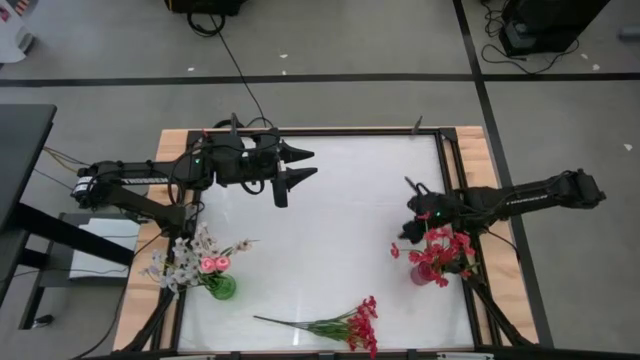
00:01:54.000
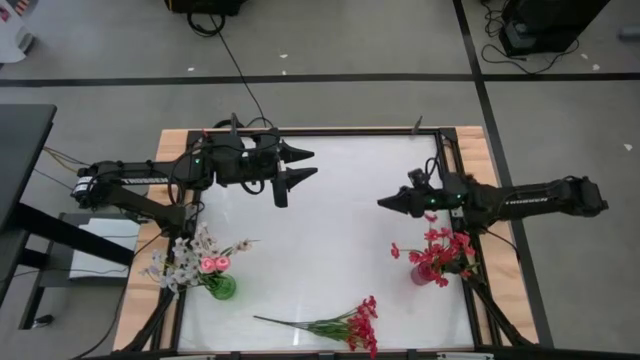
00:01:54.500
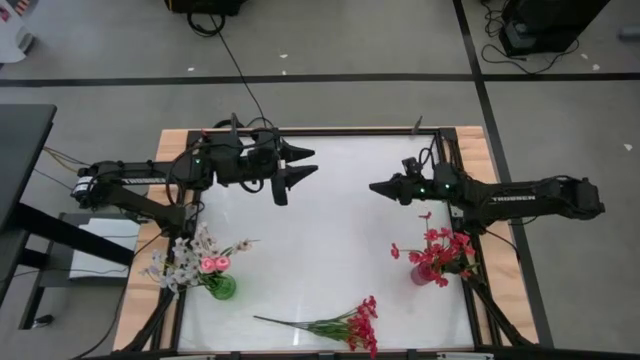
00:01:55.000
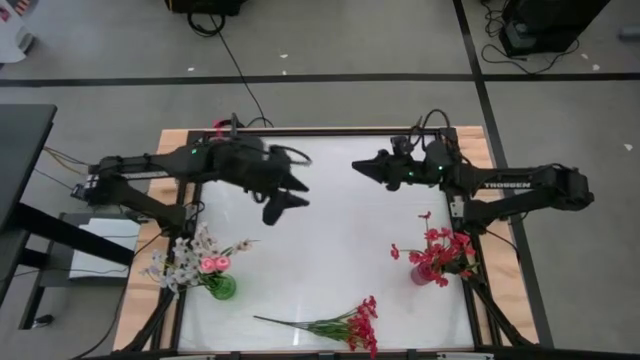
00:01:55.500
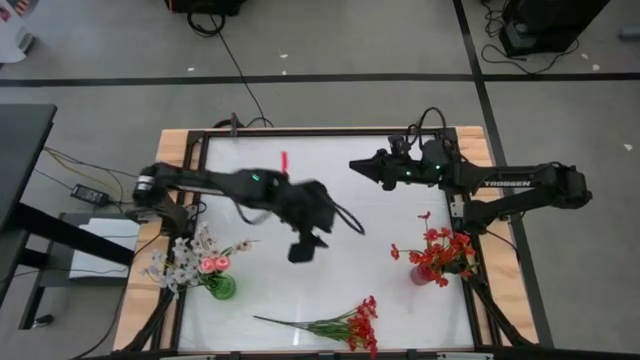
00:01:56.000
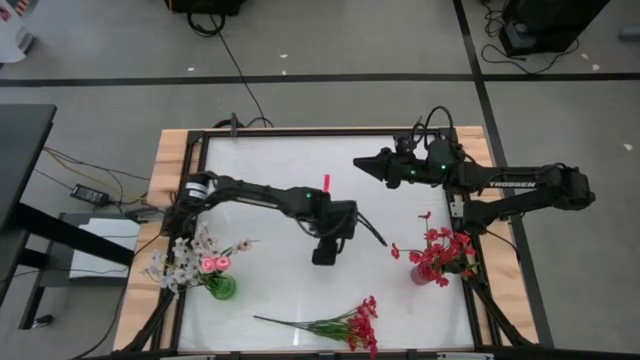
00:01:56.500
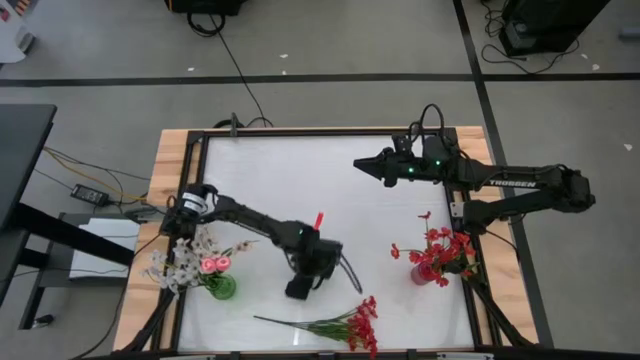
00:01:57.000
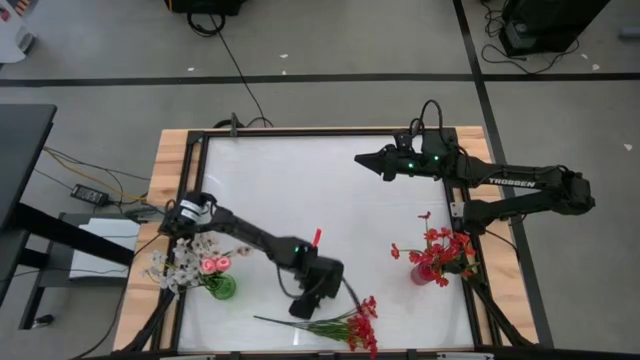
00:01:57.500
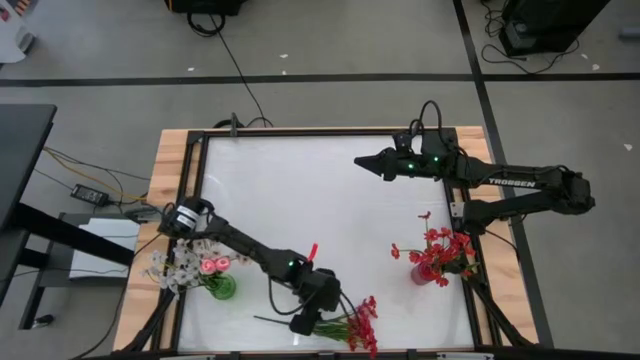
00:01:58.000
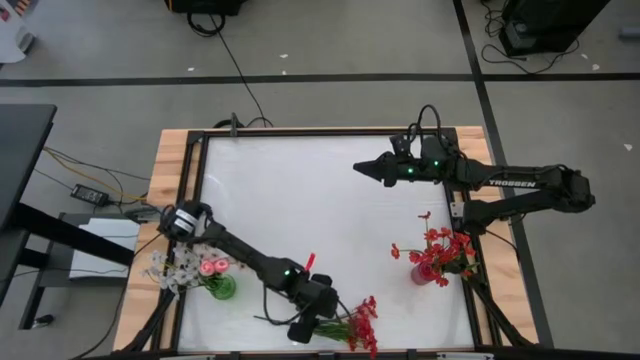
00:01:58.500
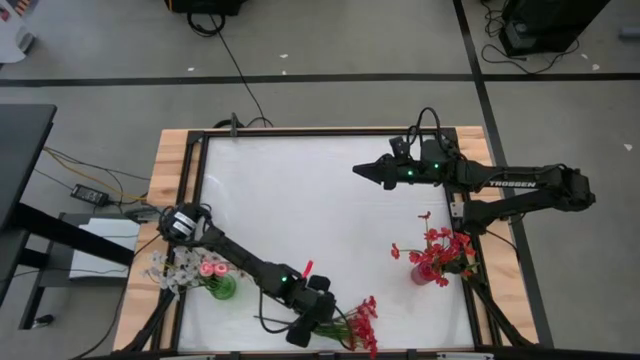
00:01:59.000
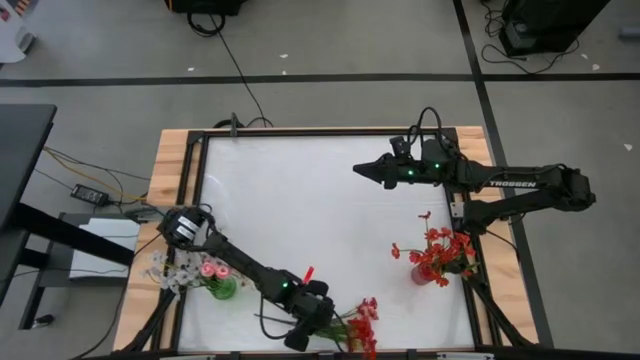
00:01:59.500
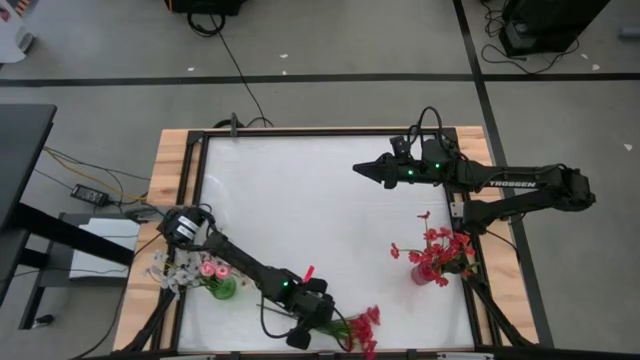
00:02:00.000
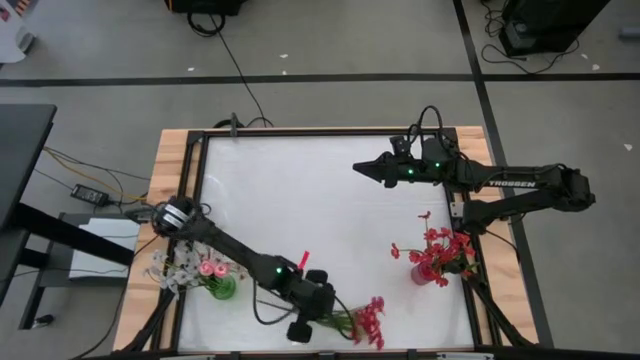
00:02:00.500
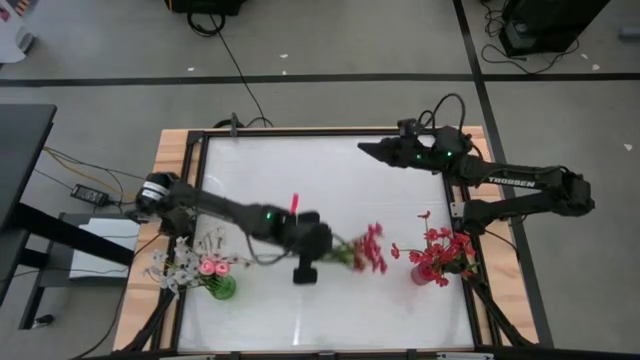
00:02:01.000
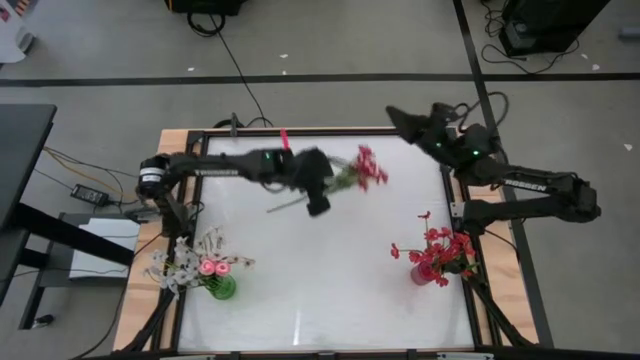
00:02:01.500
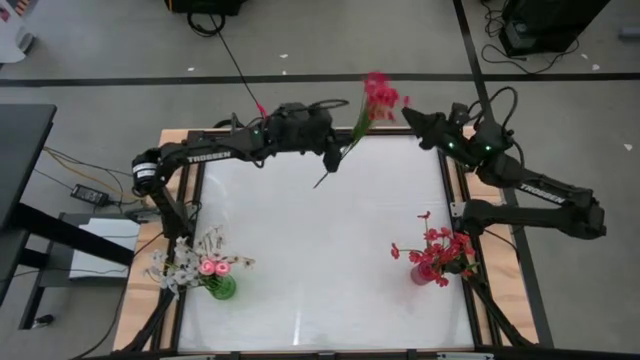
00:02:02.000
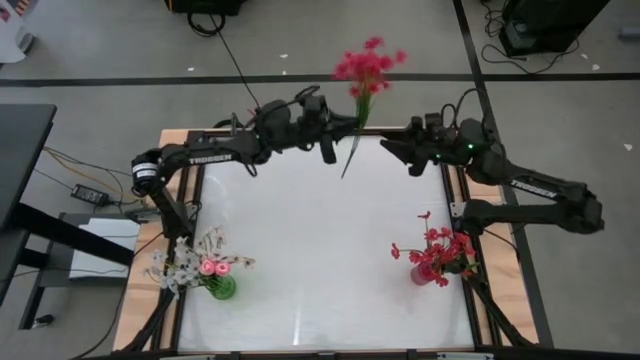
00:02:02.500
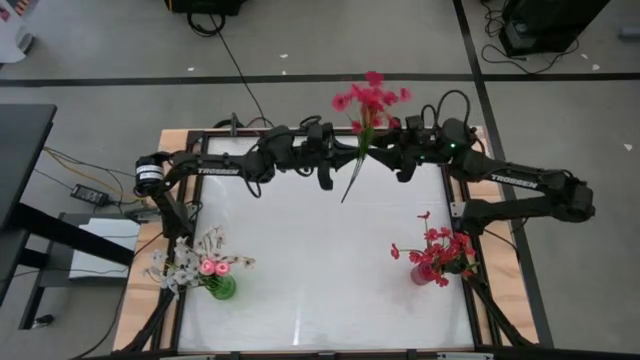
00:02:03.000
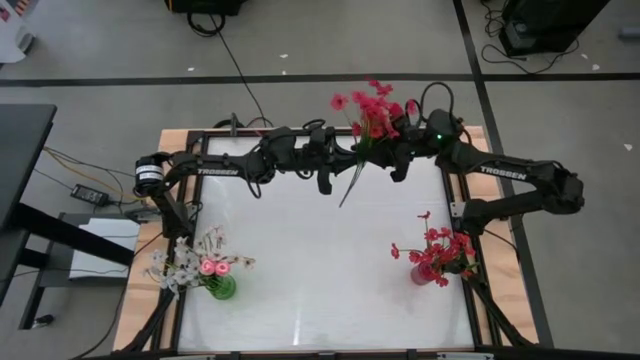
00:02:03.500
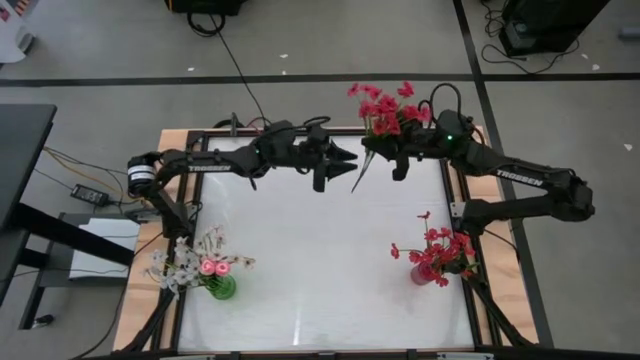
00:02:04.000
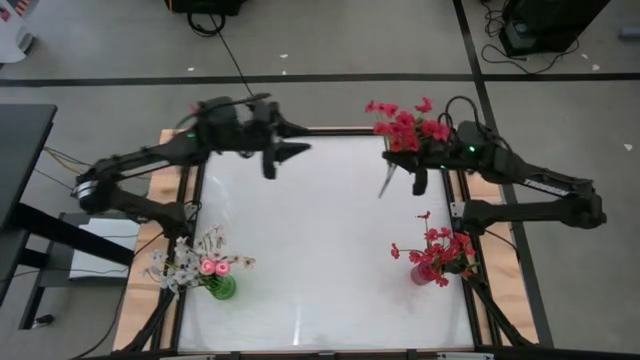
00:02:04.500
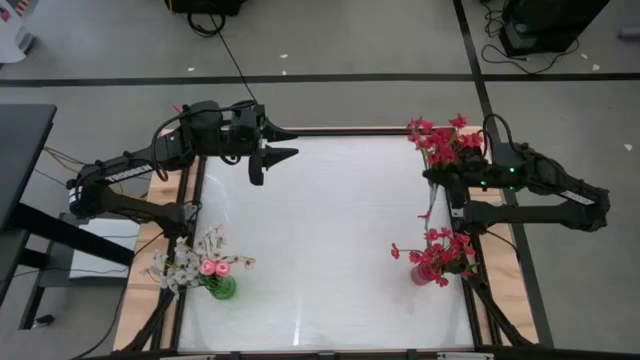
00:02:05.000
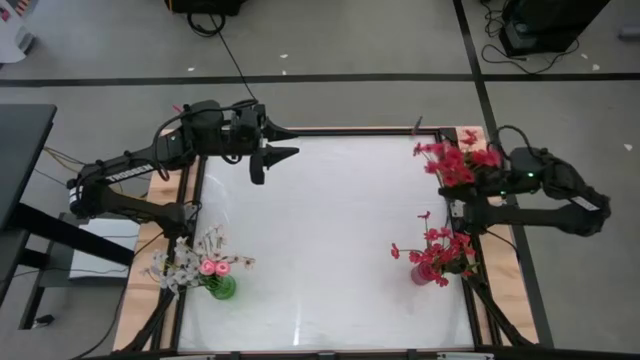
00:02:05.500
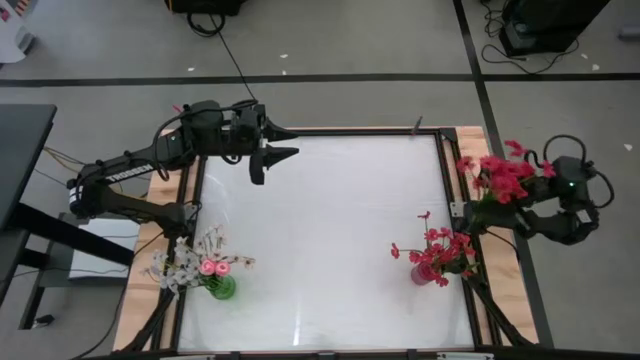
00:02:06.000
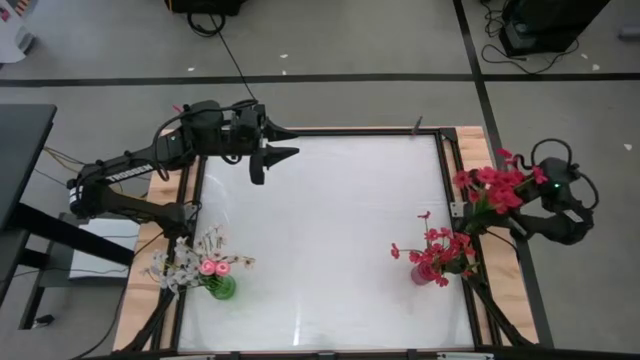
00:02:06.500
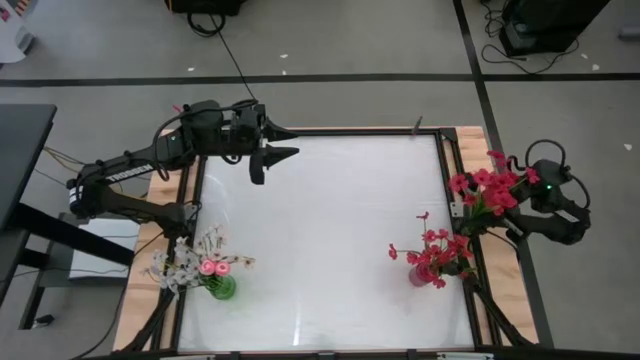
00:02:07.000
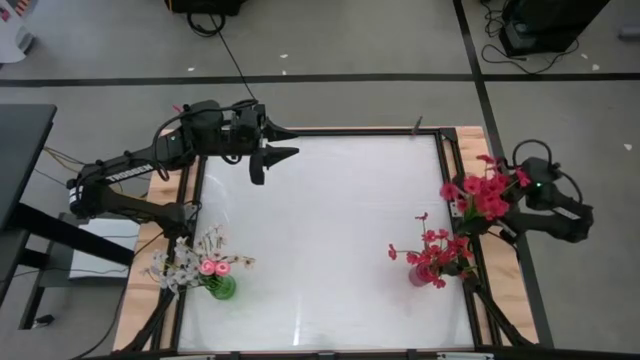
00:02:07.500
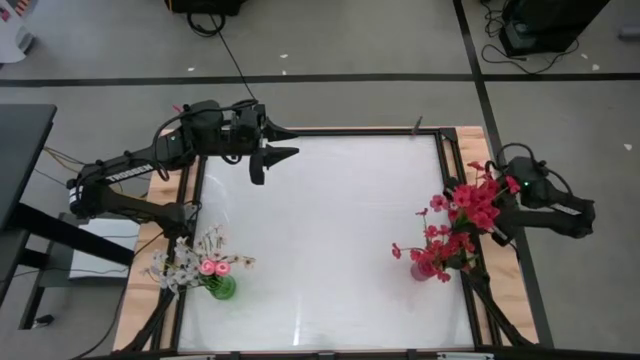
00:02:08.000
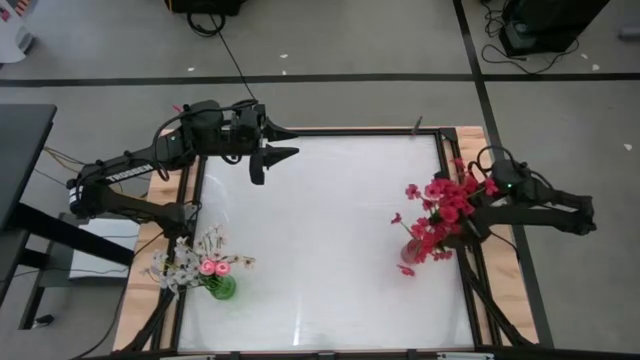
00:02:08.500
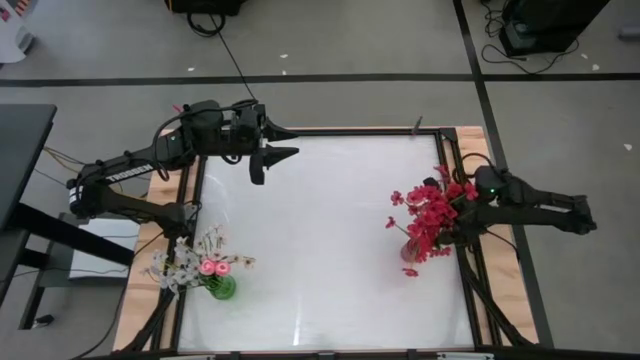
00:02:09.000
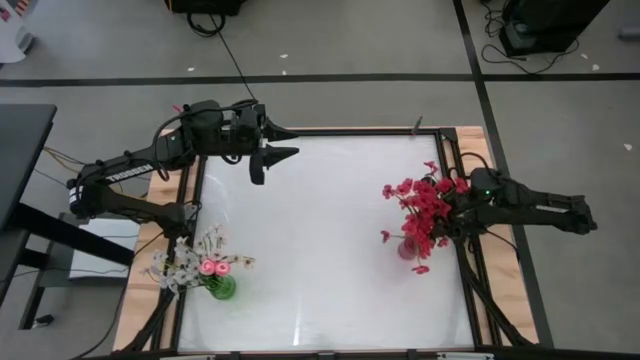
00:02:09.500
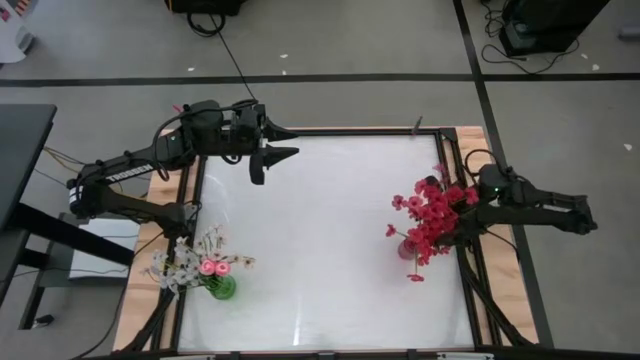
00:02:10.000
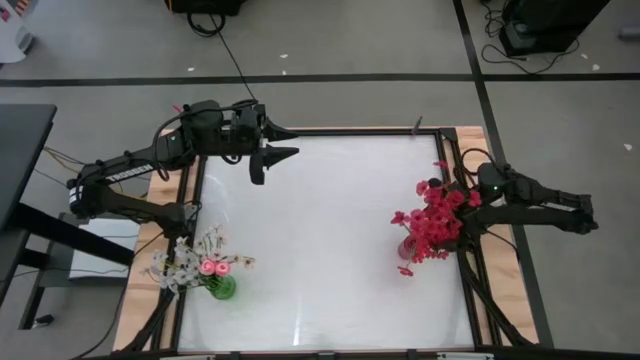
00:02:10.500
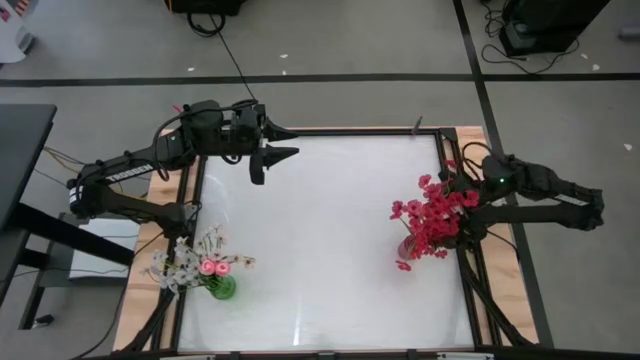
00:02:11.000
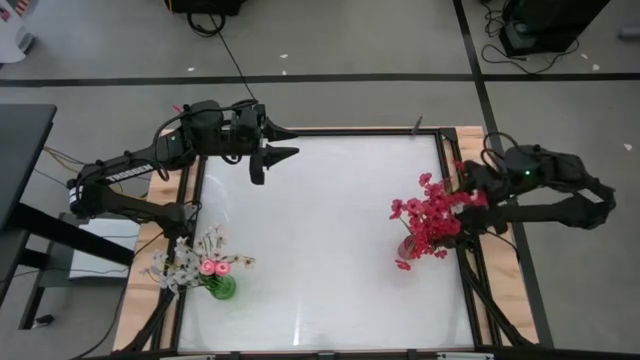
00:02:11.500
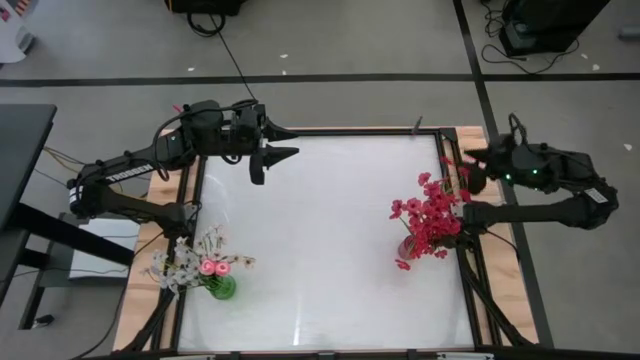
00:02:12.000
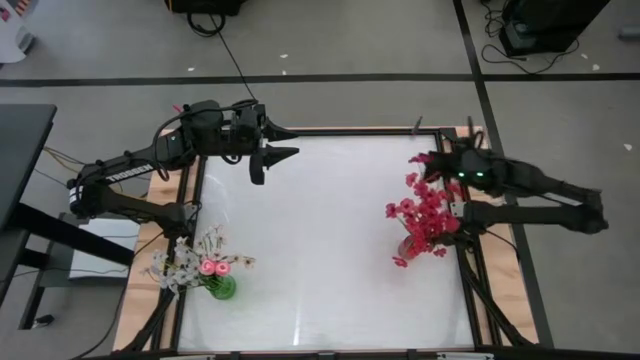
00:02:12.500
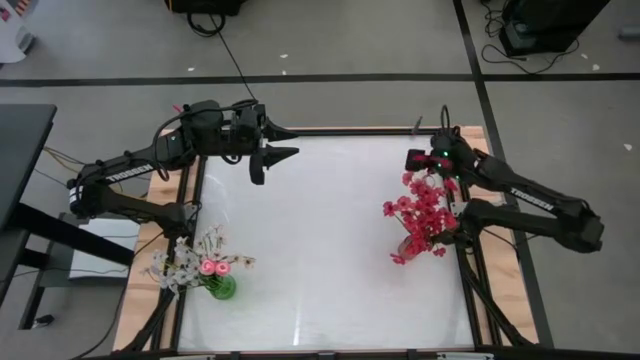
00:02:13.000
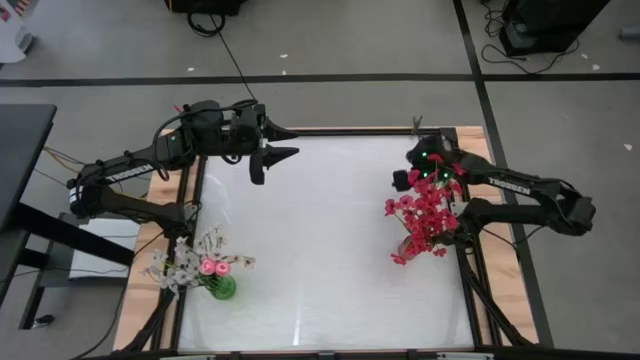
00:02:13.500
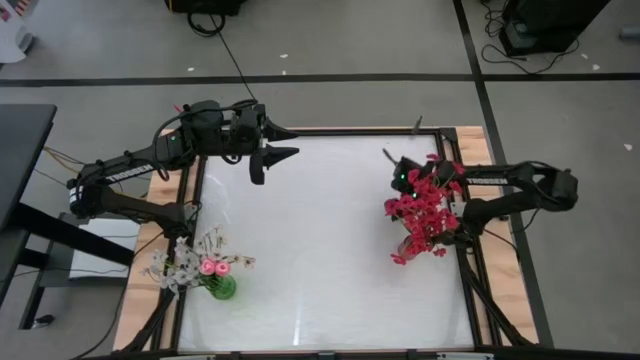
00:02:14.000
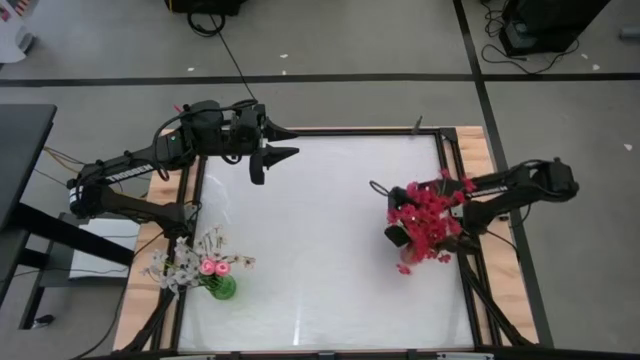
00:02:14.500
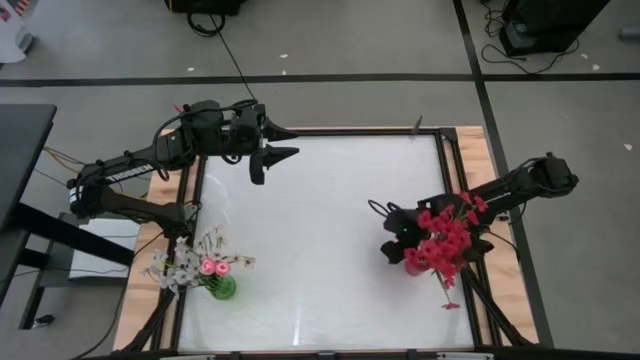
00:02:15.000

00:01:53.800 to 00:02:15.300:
Task: Sort flowers into vase by color
Put the red flowers into the red vase
